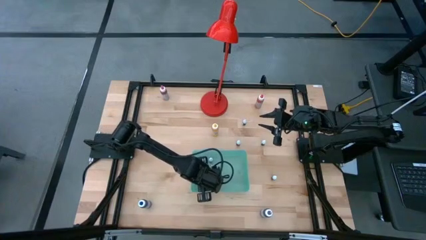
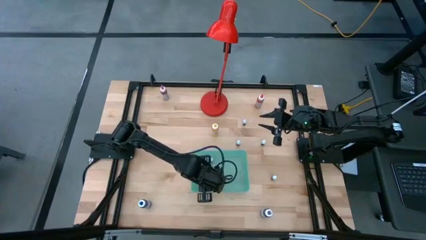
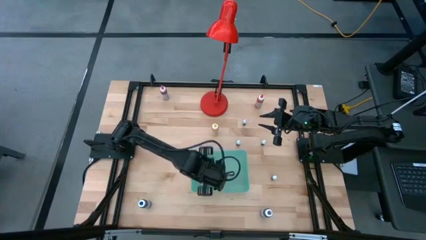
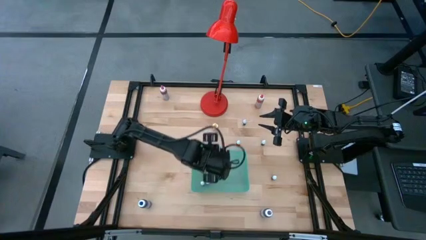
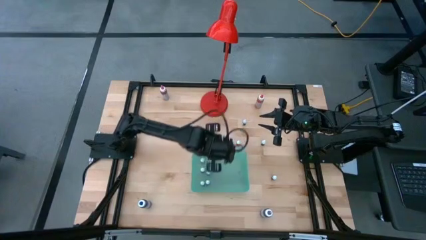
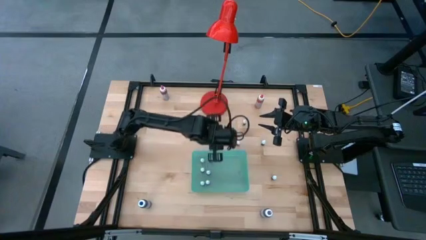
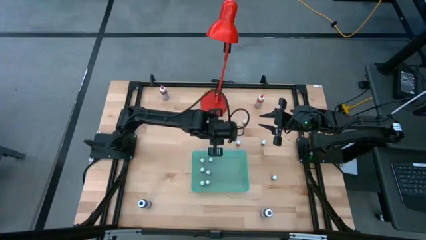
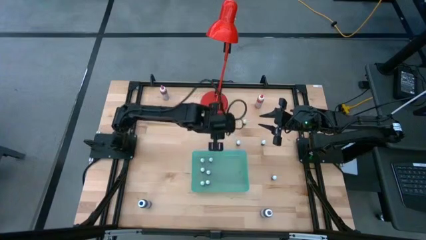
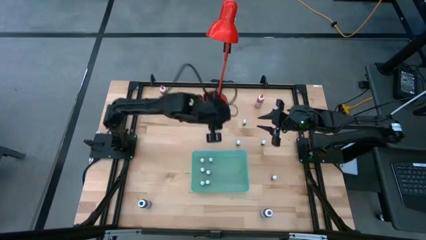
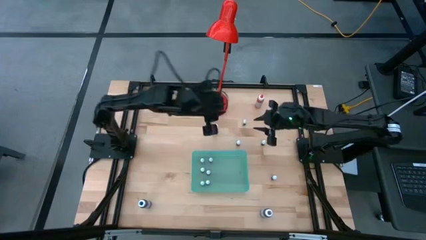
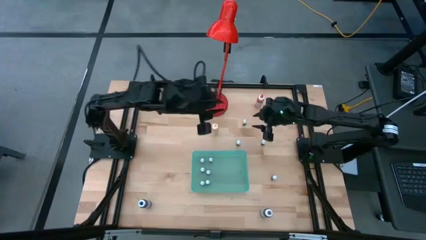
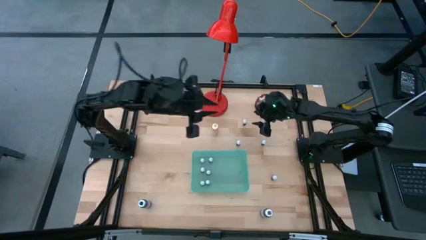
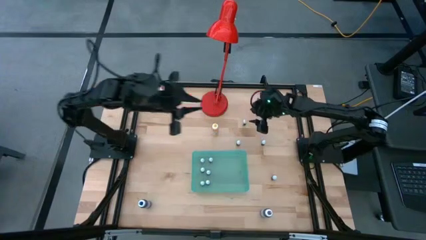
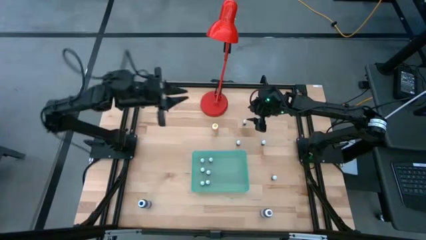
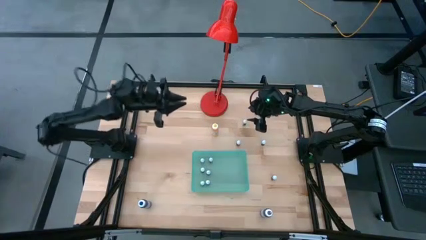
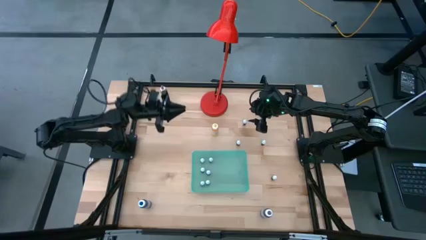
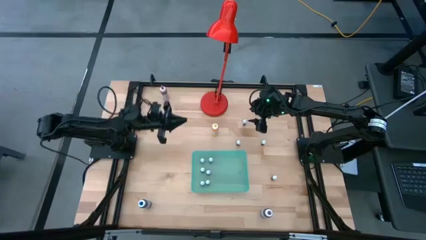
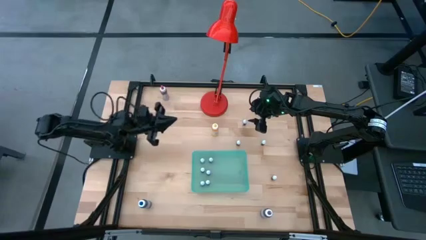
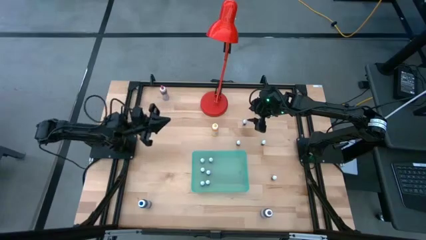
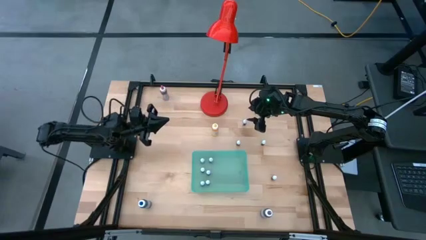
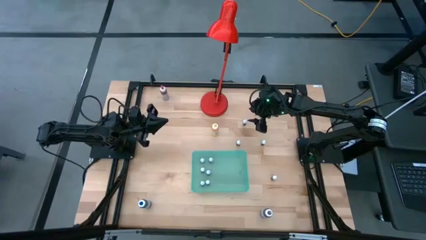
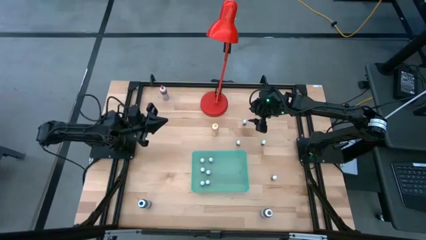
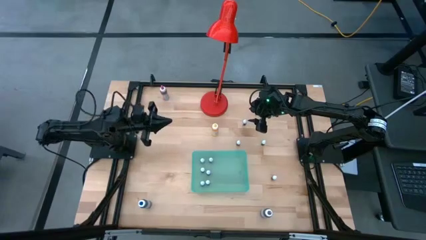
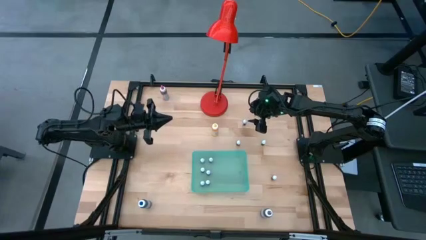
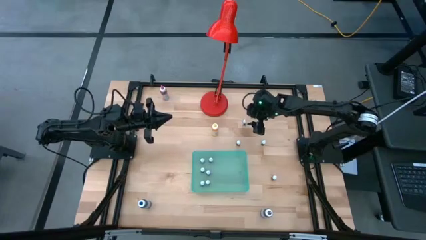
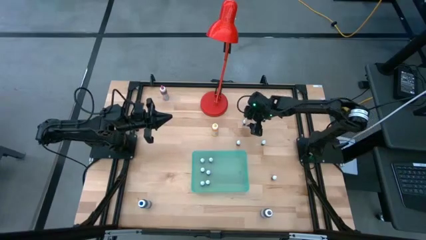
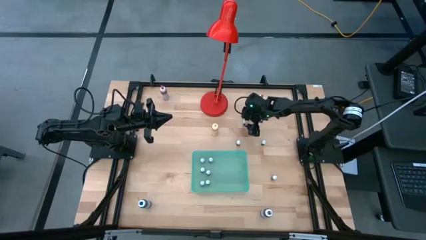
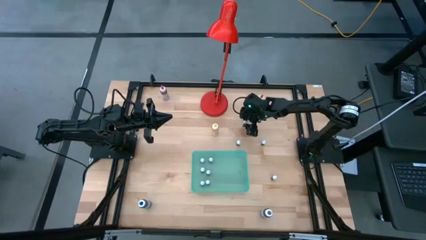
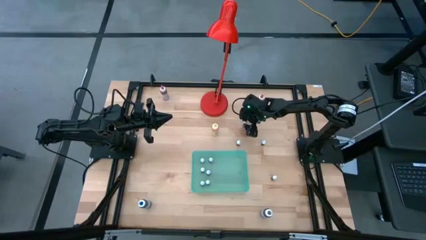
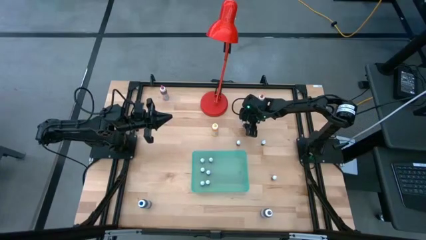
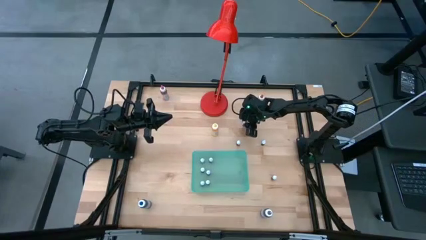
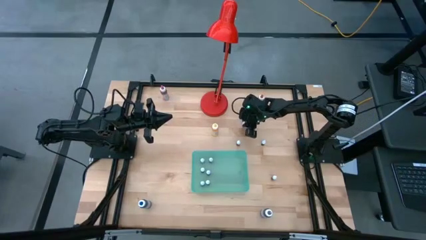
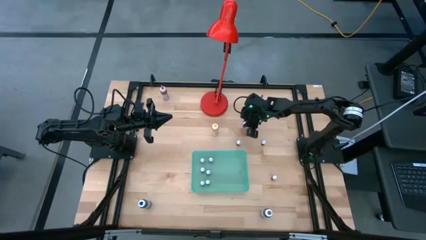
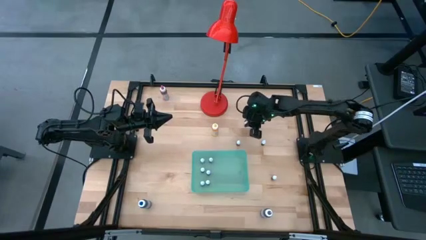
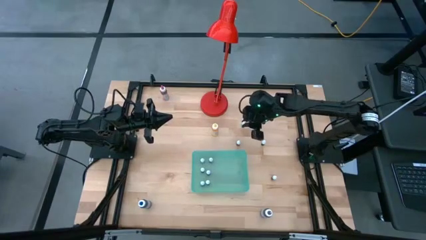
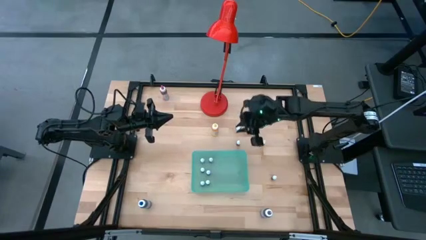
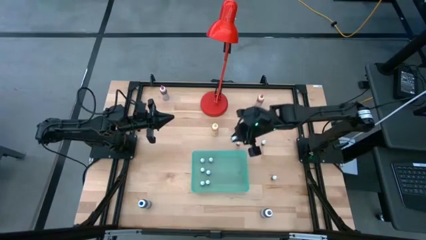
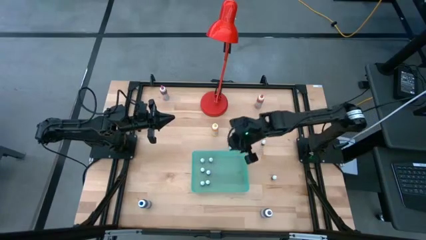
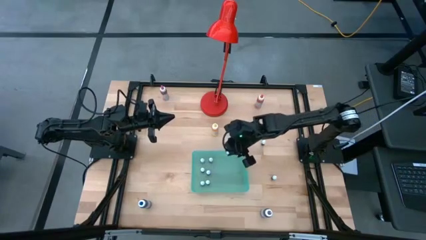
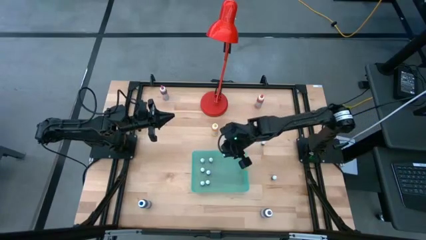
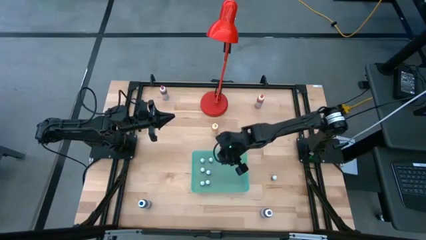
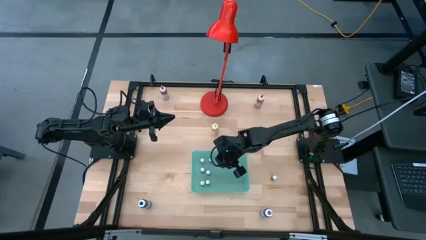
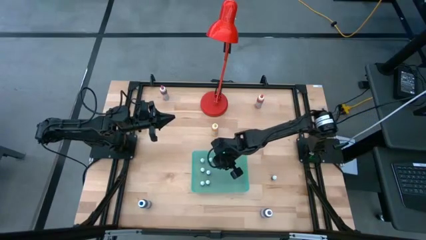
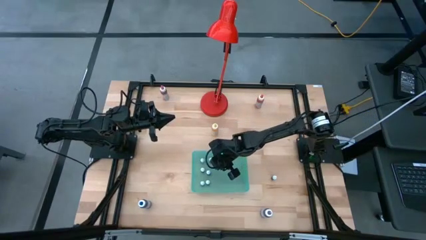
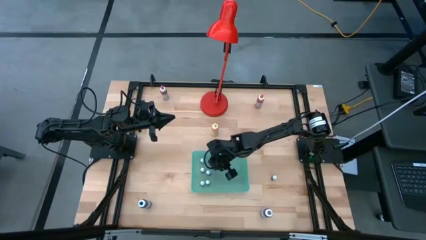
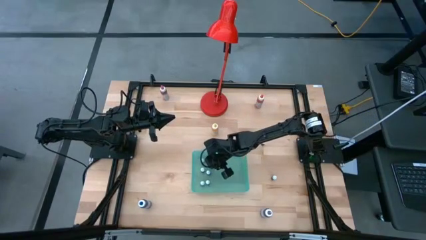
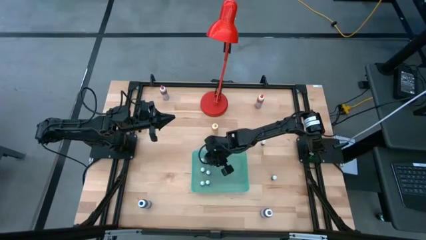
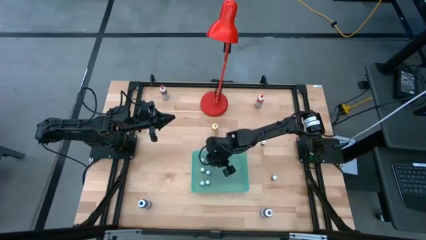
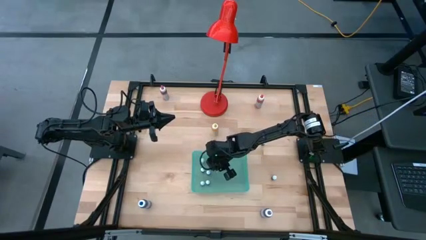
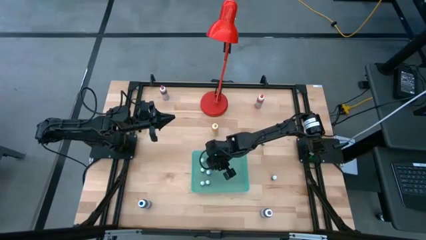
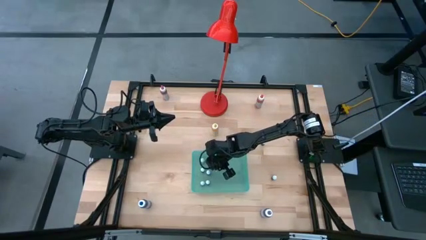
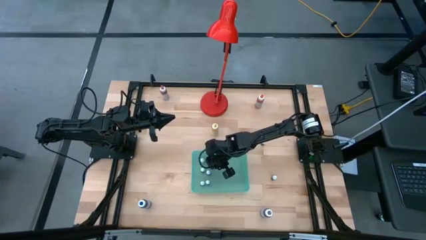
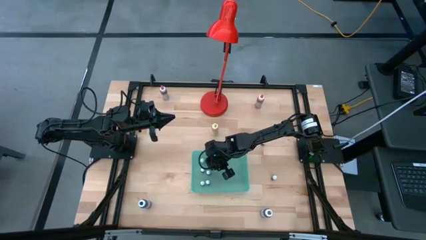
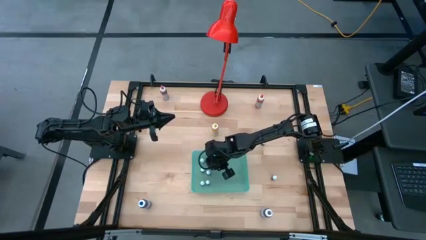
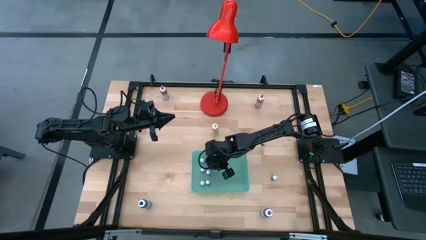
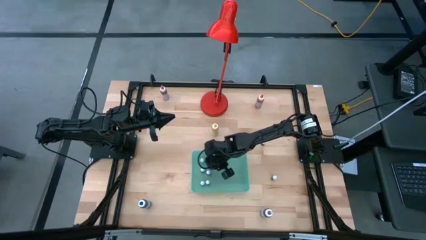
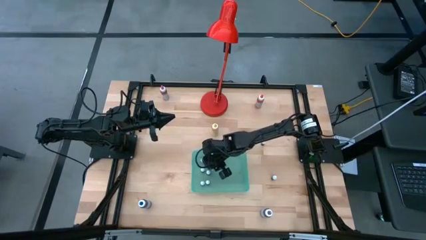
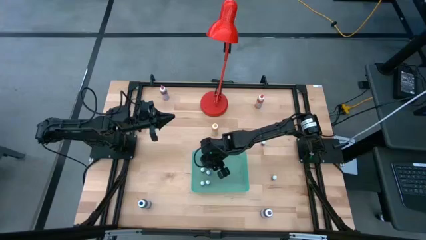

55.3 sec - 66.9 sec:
Task: Pick & Place food coloring
Put the black and red food coloring bottle into the blue bin
